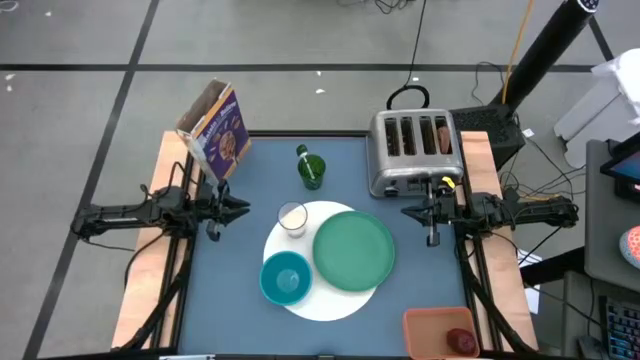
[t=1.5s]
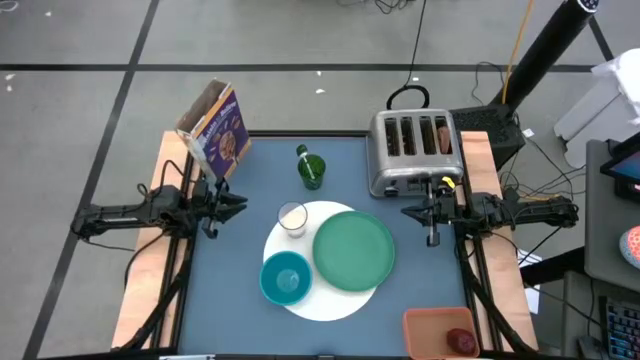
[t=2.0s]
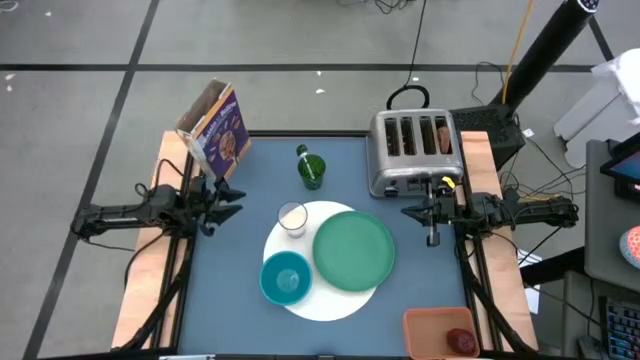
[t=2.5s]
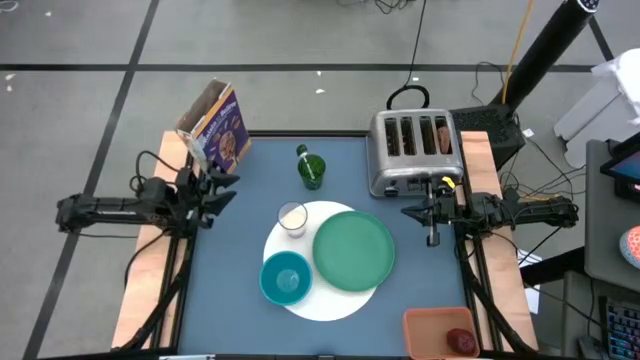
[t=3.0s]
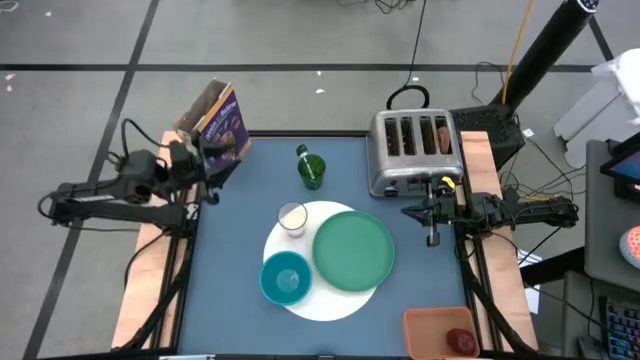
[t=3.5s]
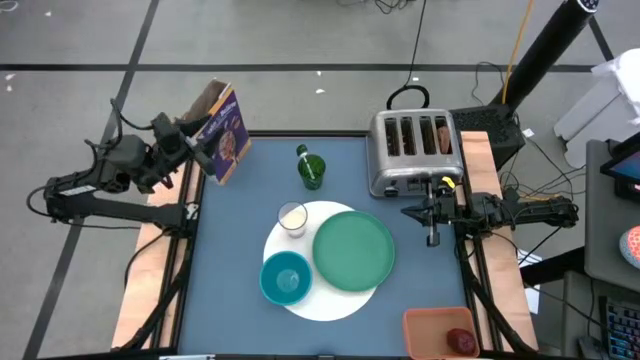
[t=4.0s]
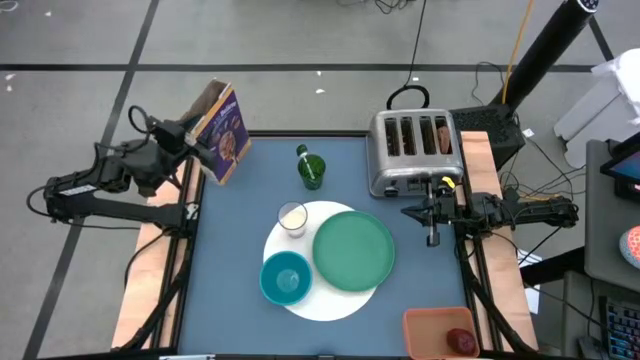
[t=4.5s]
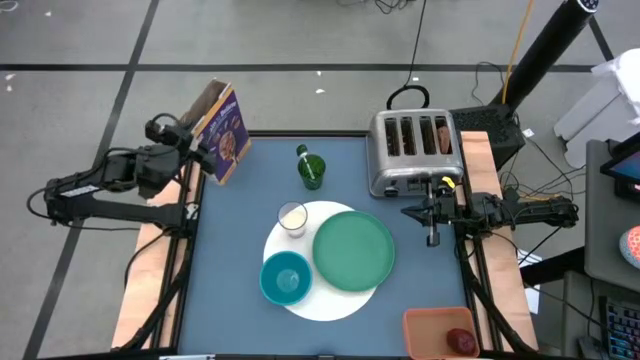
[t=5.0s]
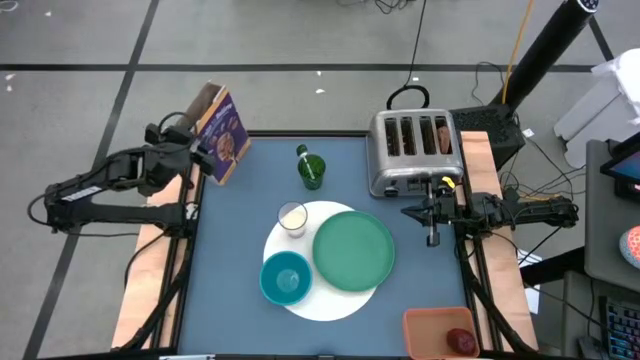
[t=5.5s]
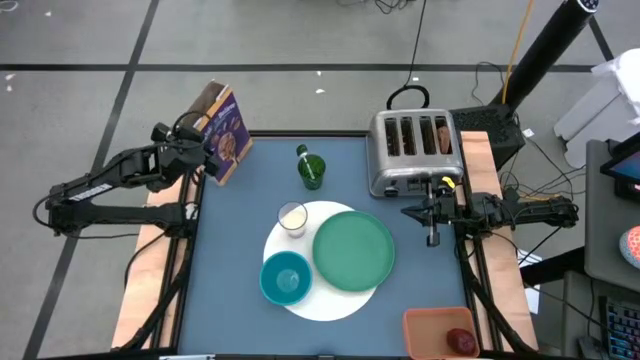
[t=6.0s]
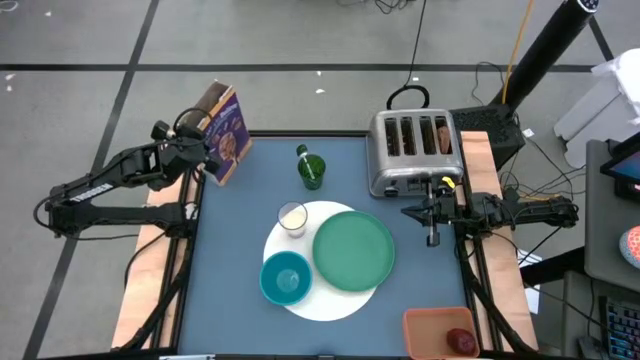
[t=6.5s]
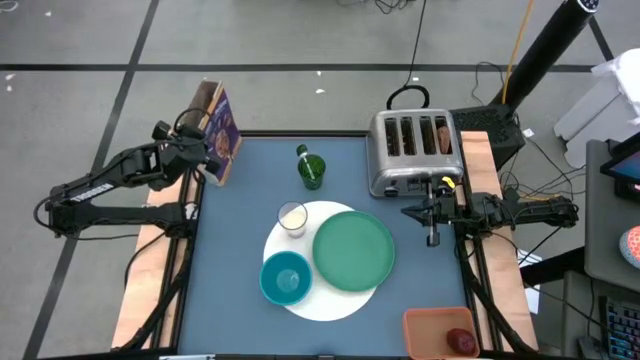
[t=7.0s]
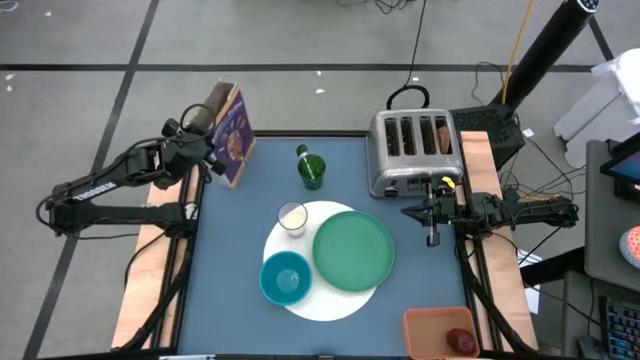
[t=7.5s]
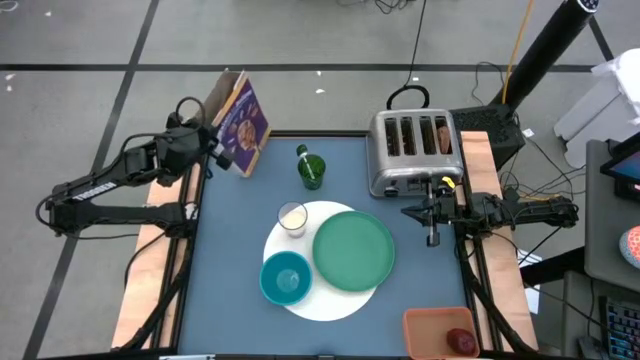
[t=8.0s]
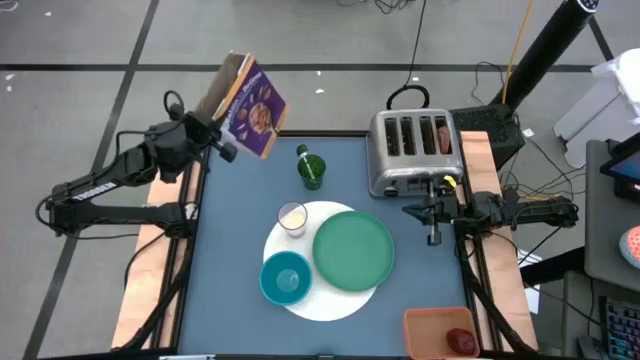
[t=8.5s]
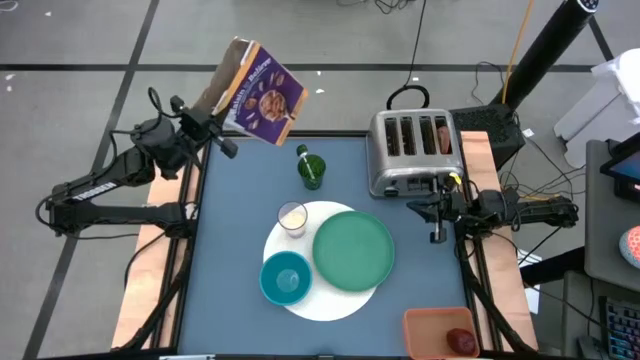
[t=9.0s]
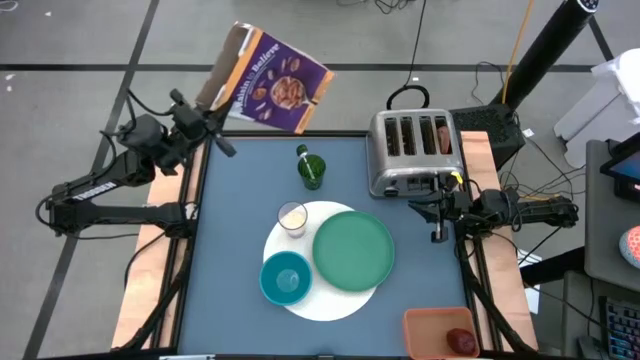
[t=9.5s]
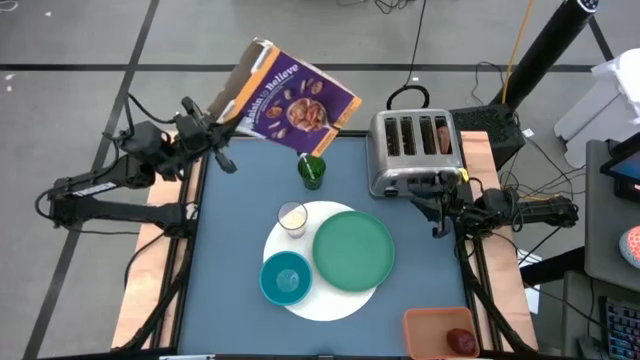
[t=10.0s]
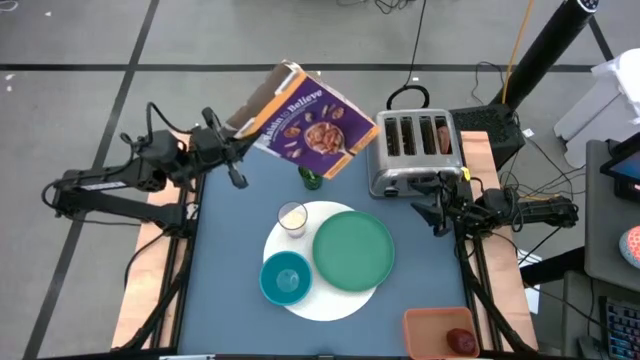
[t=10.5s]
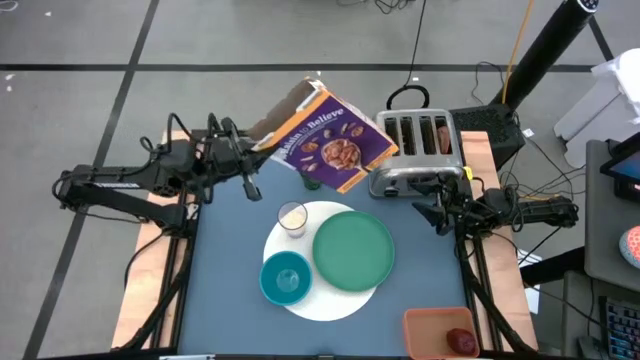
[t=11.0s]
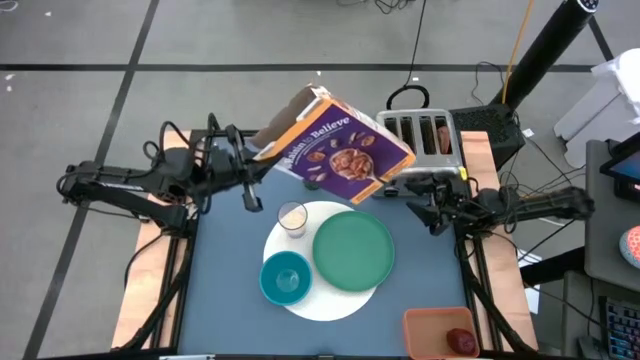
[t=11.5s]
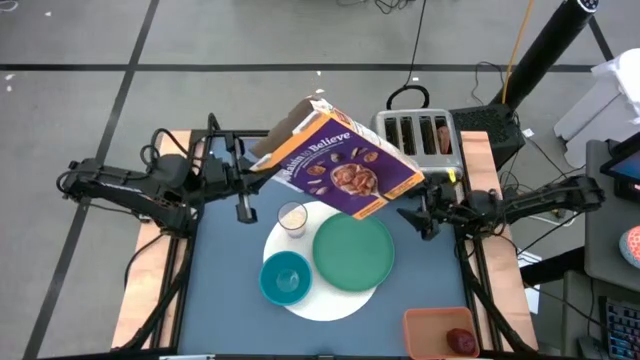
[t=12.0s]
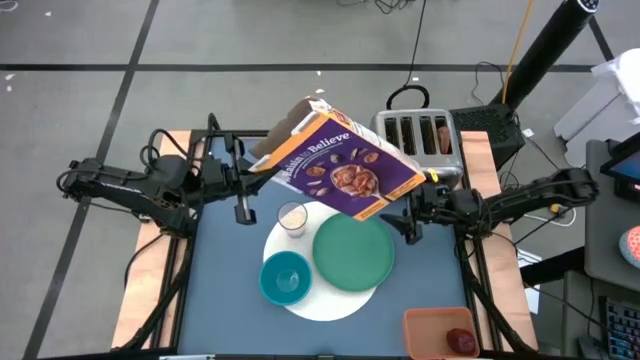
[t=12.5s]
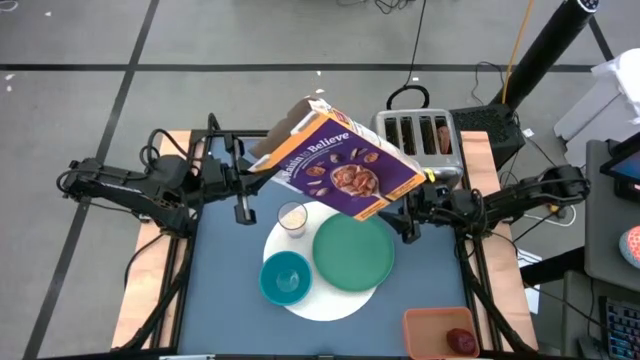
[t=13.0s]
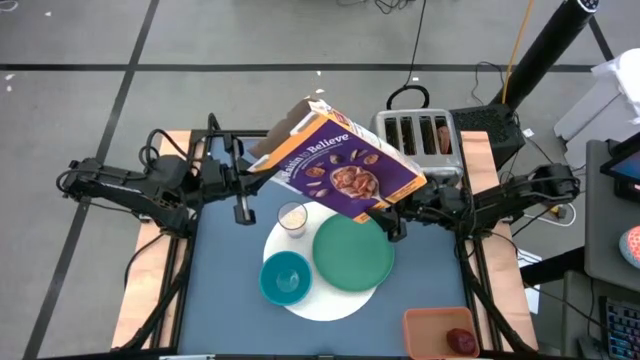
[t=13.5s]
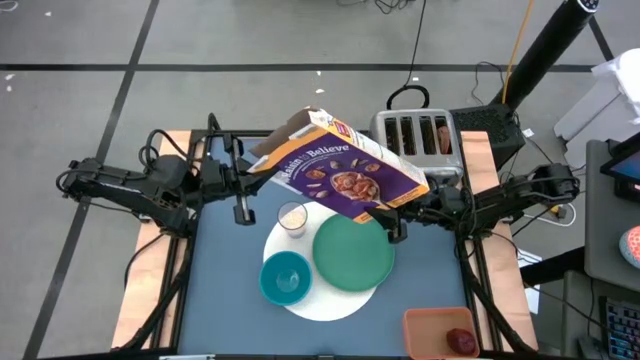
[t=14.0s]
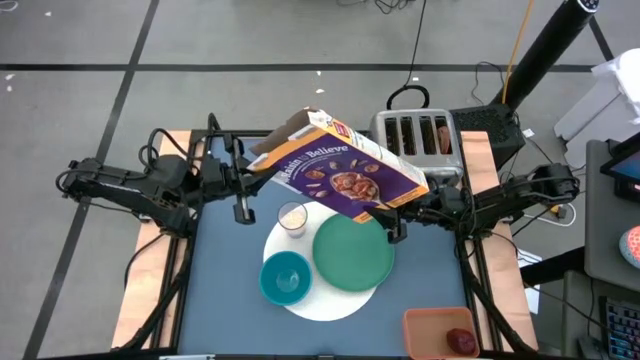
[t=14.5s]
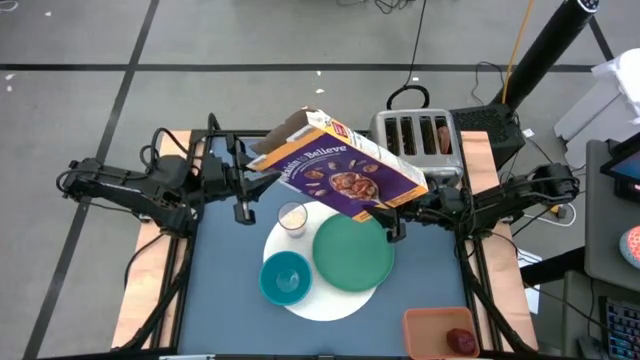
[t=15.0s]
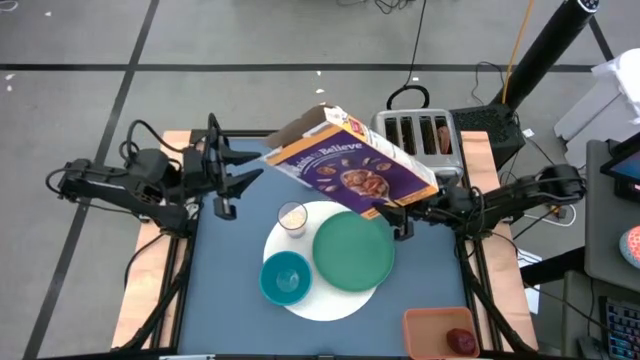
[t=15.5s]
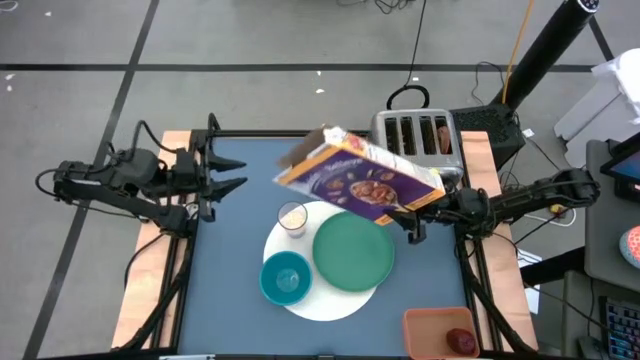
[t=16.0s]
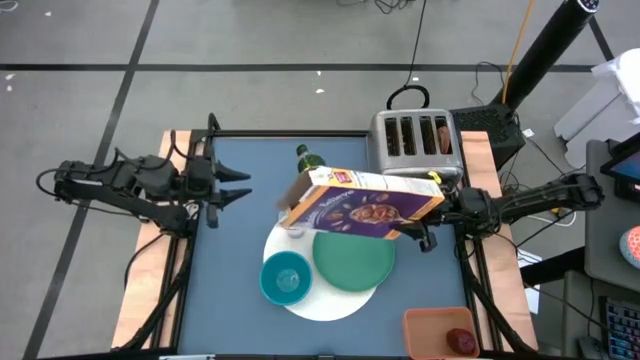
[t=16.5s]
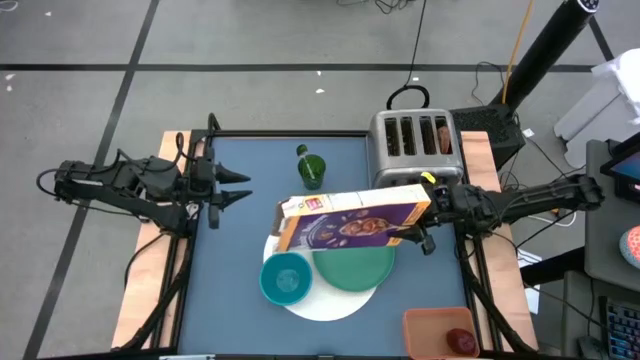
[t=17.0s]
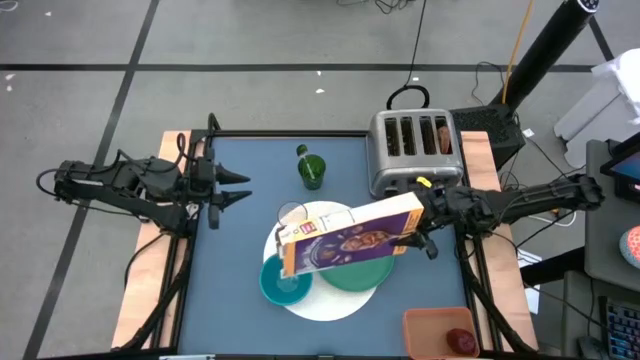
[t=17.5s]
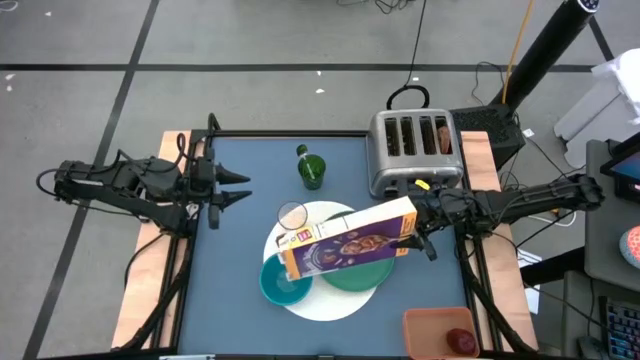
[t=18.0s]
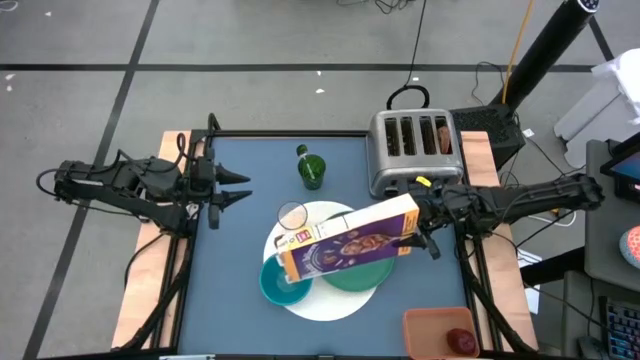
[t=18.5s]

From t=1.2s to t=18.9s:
Task: Arrange a breakfast setting
Pour the cereal into the blue bowl from the cereal box
